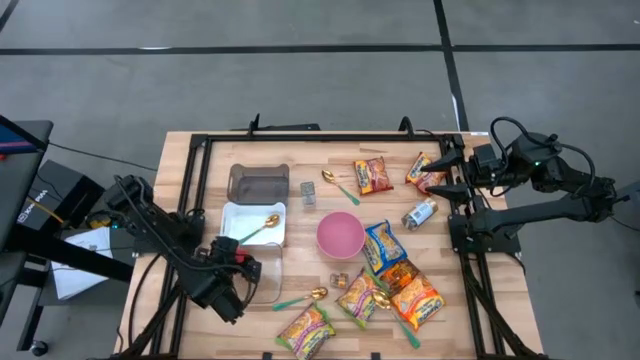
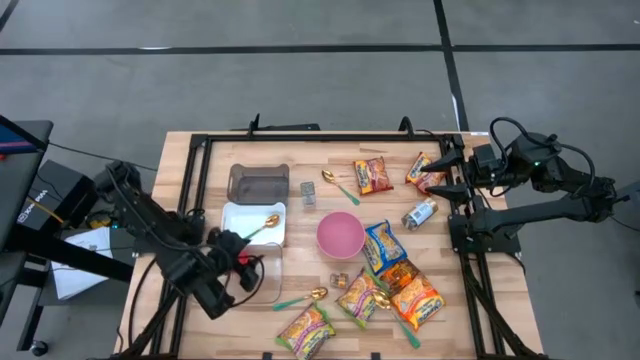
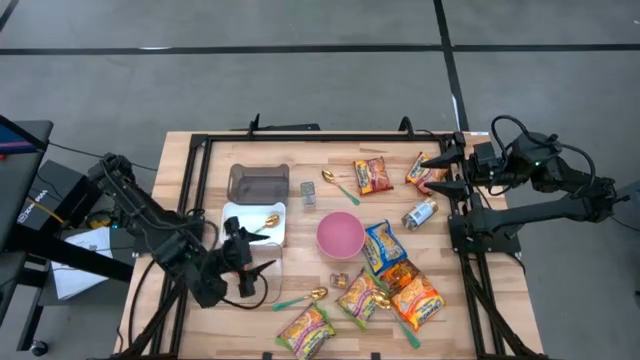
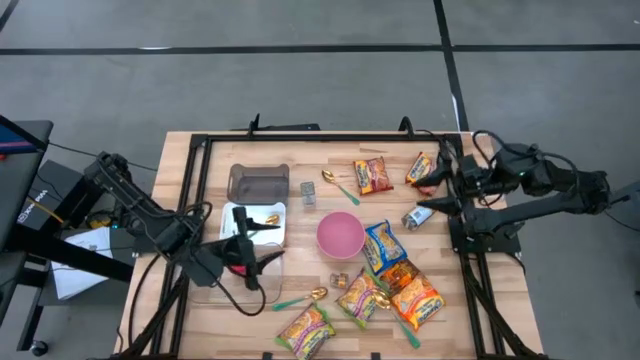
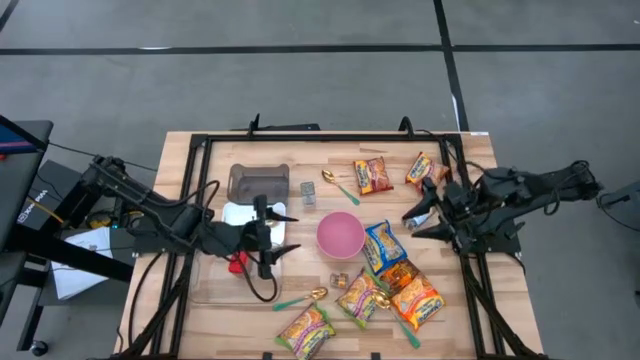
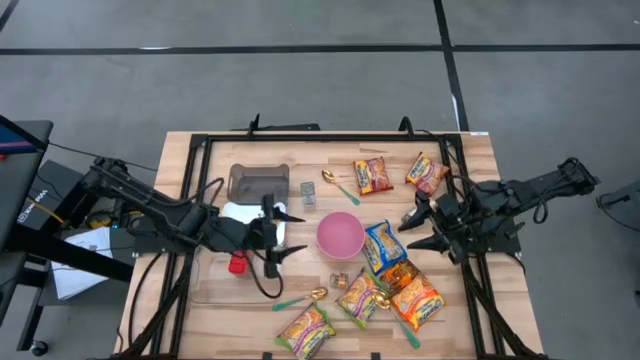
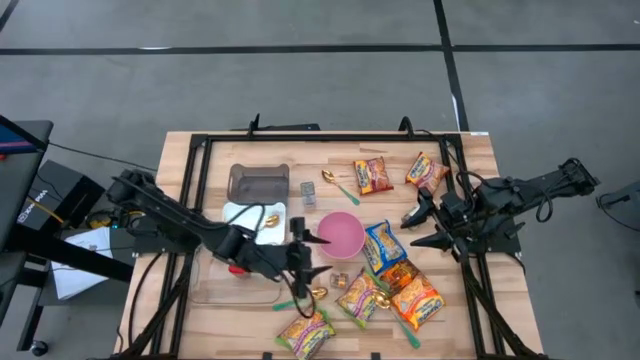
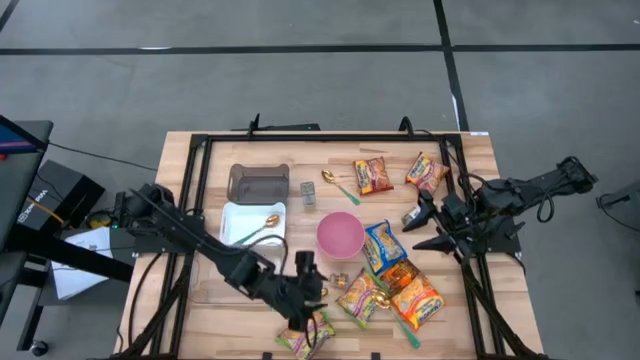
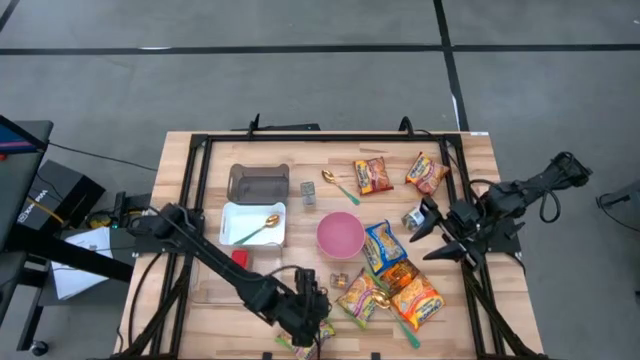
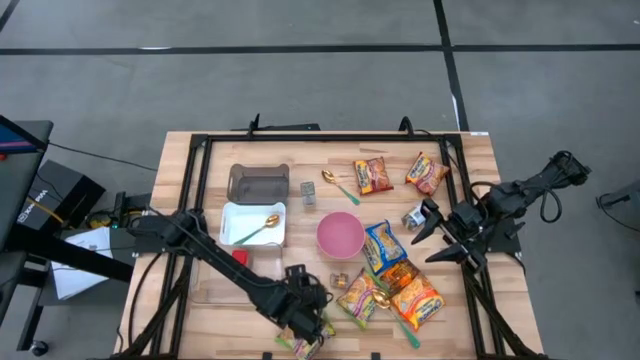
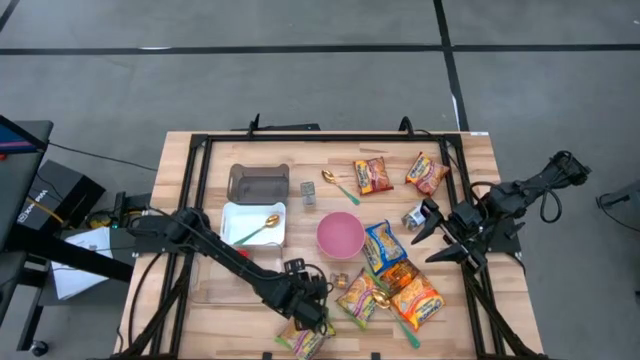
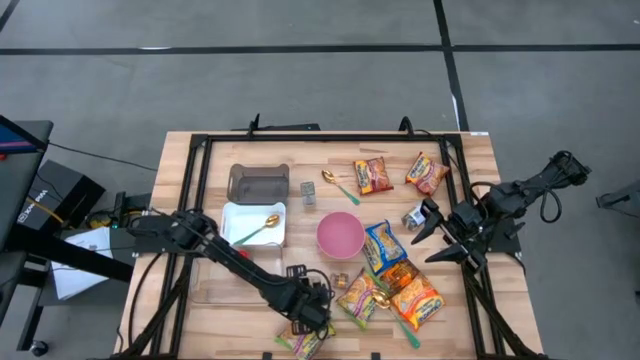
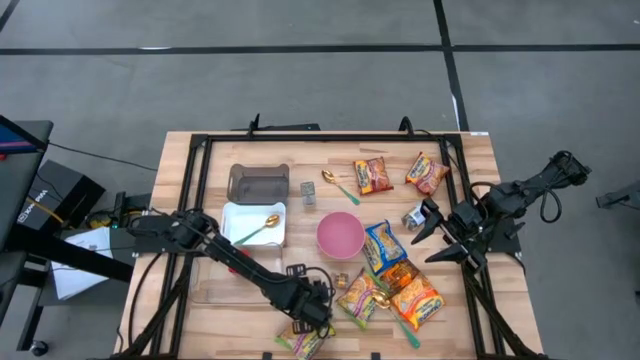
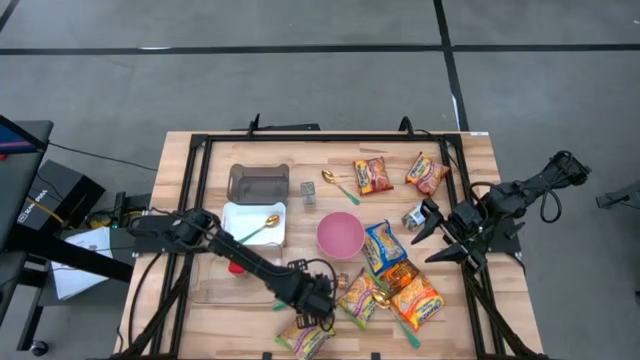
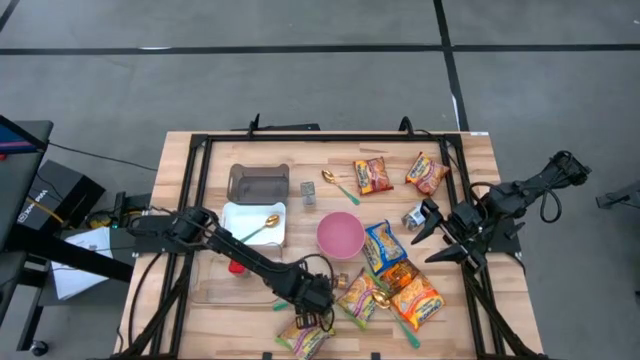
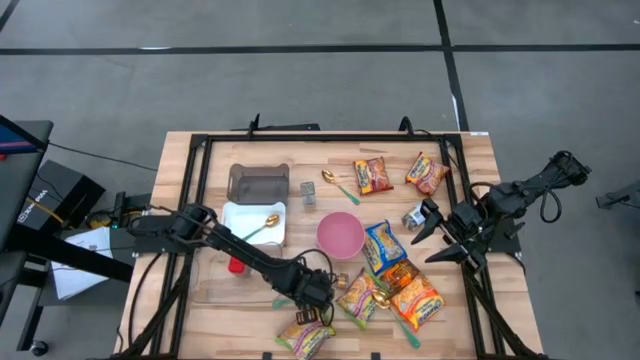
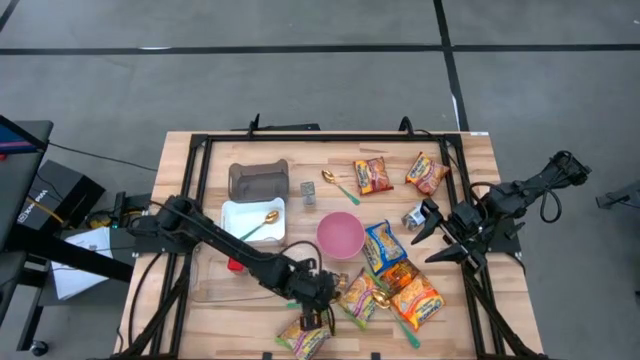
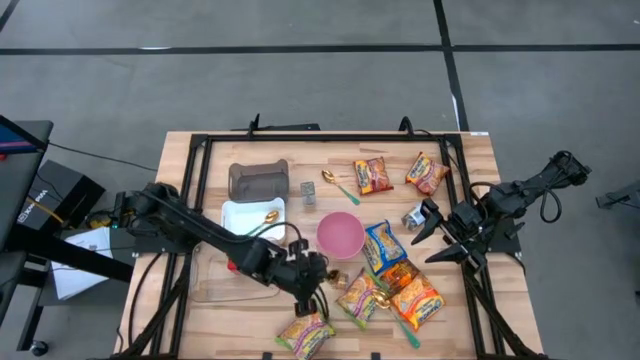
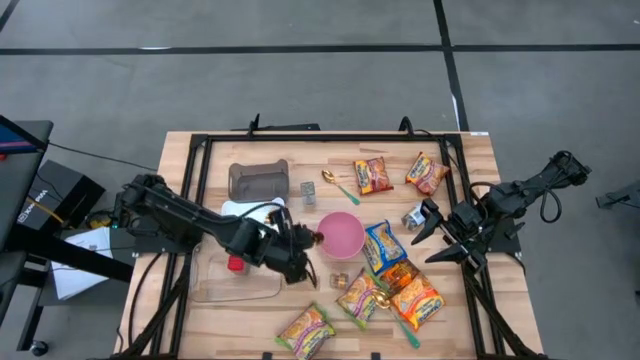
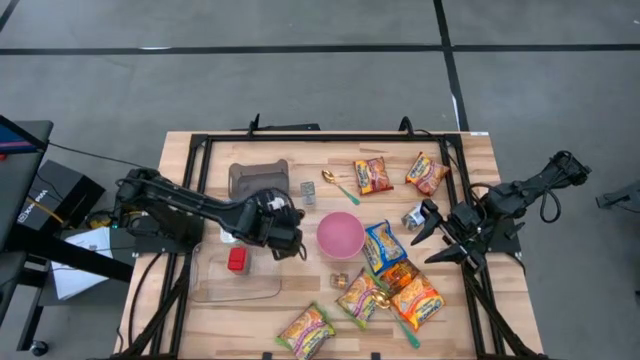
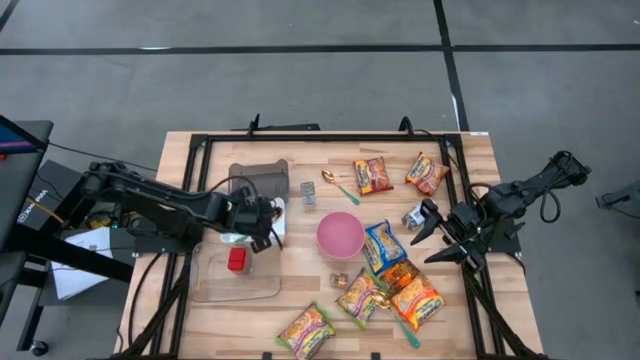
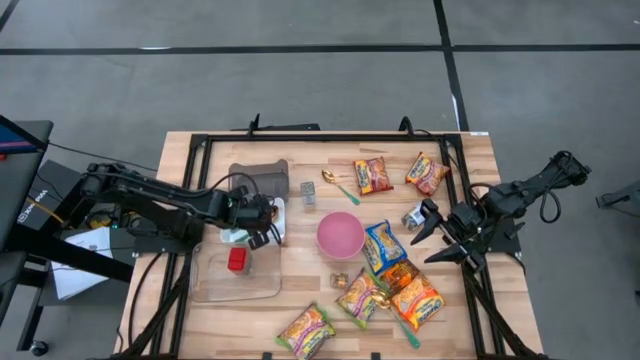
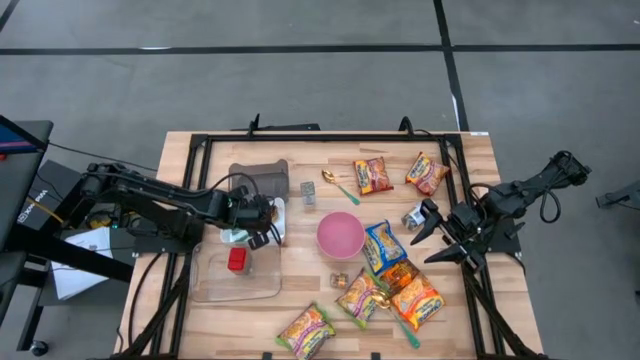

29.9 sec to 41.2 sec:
Task: Pick & Place Food Item
Put the green spoon into the white bin

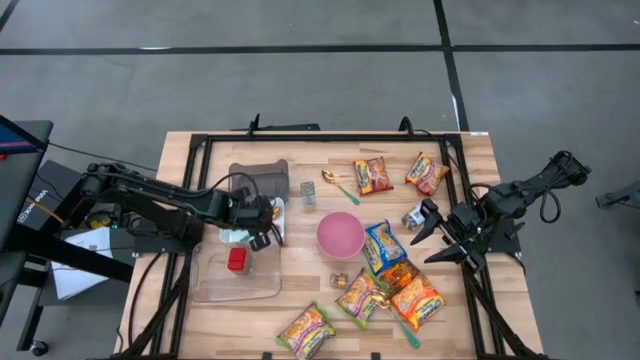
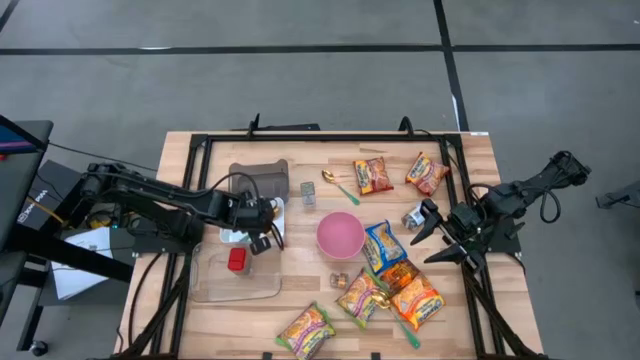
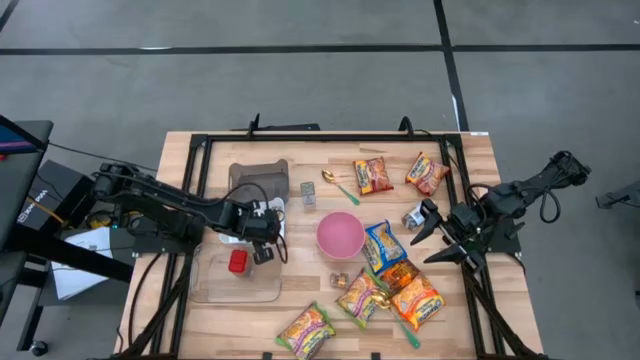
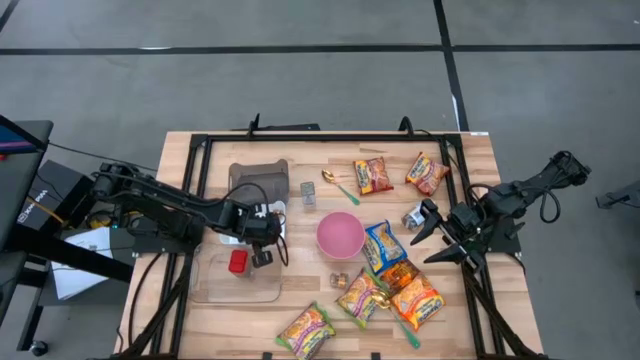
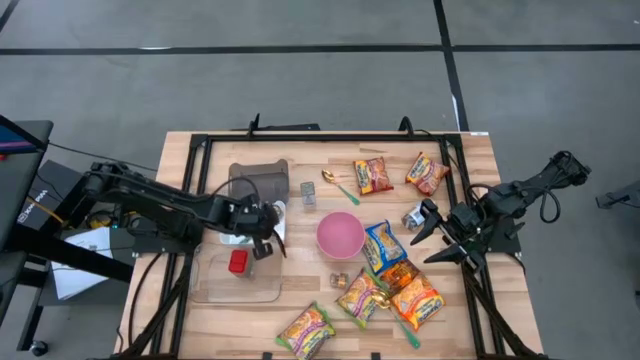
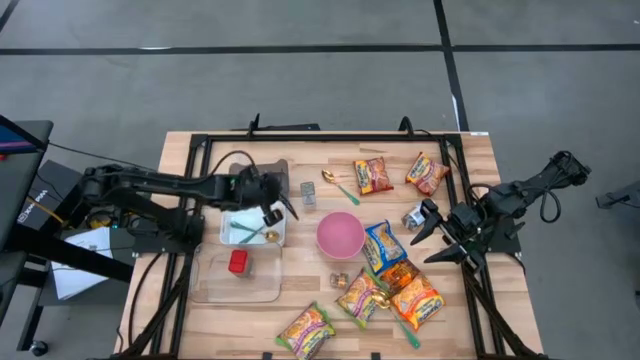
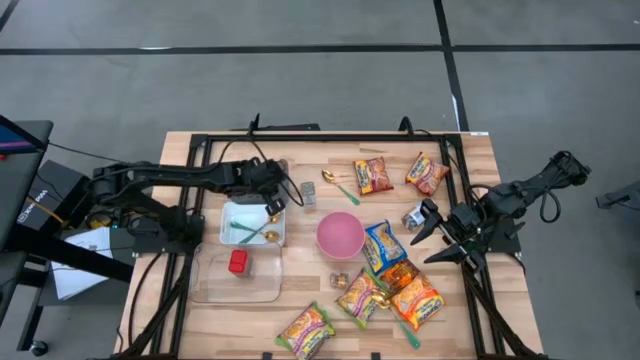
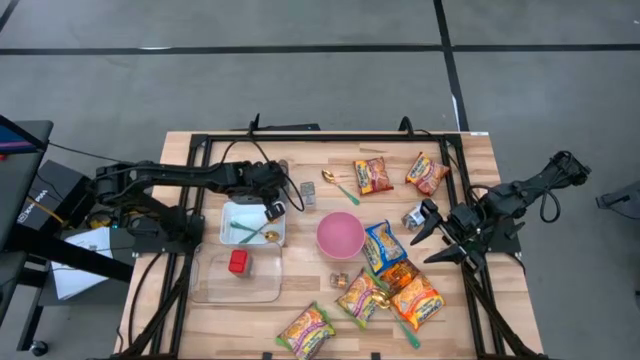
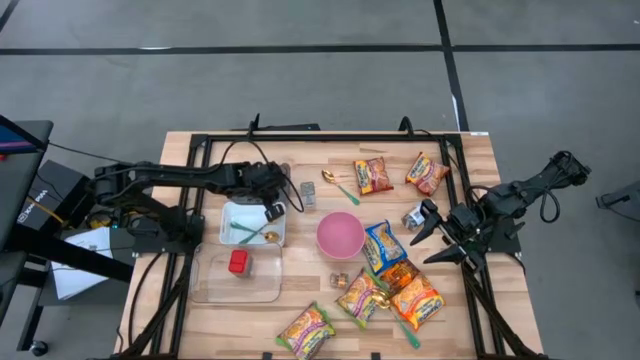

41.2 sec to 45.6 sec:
Adjust the bins

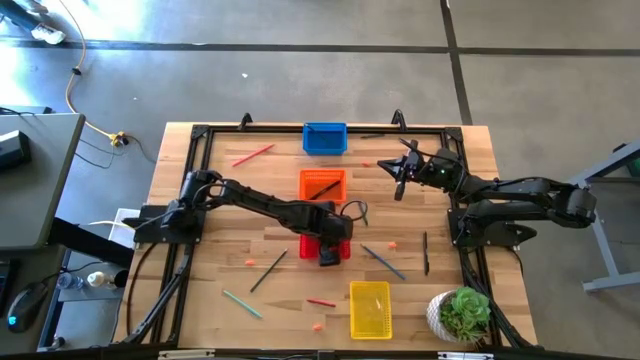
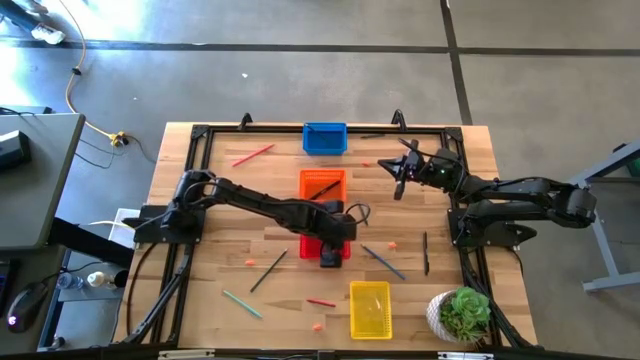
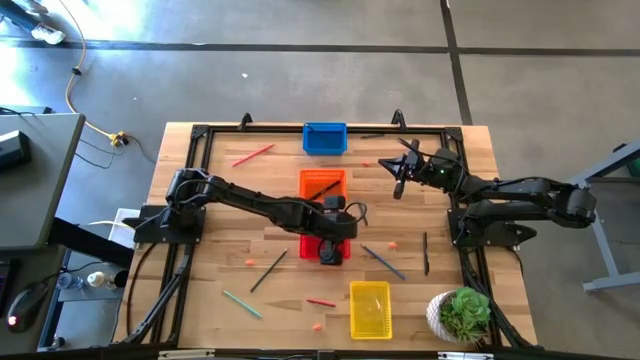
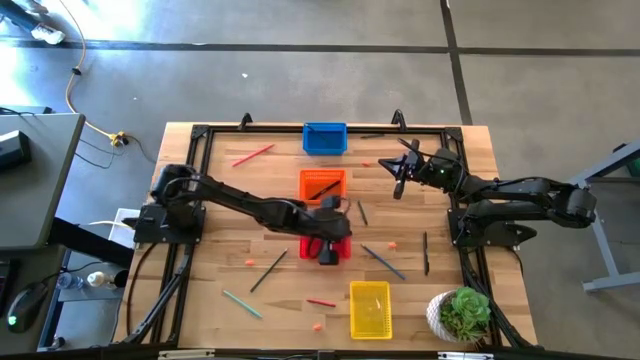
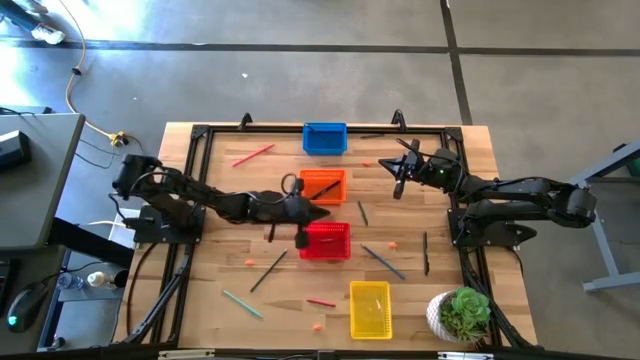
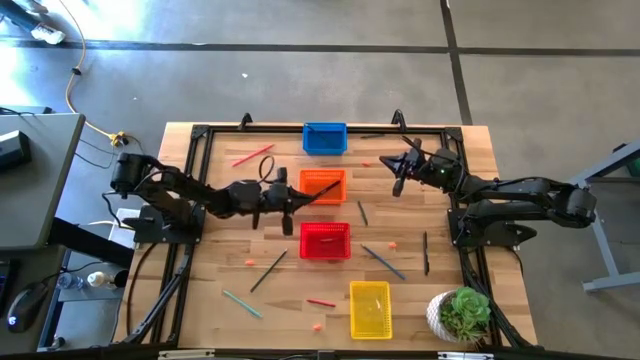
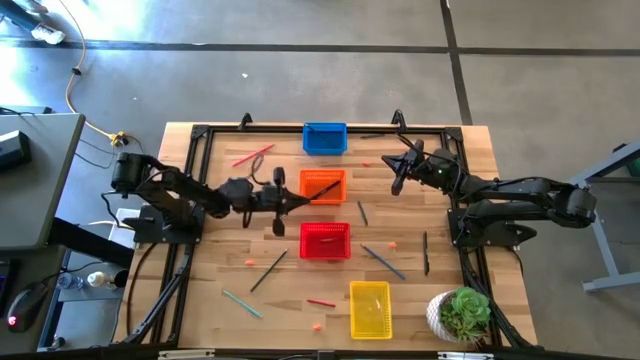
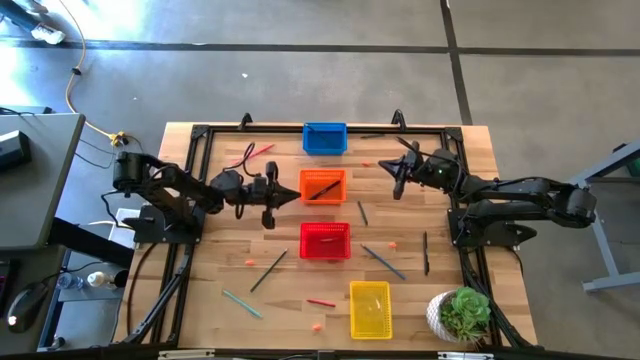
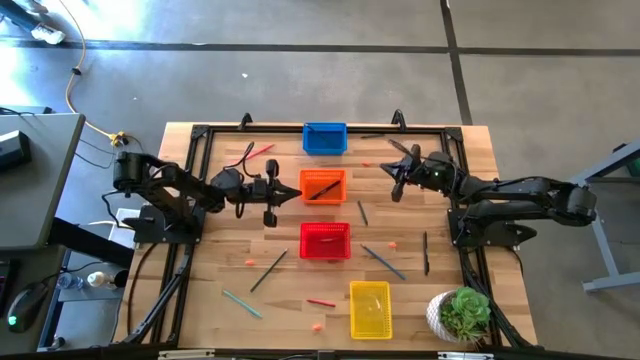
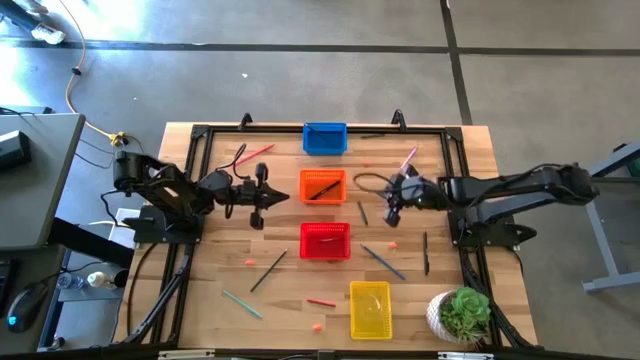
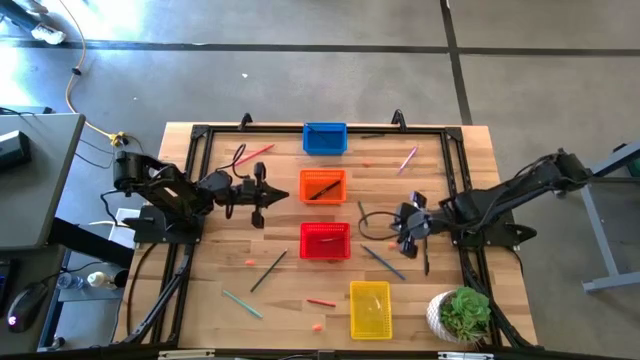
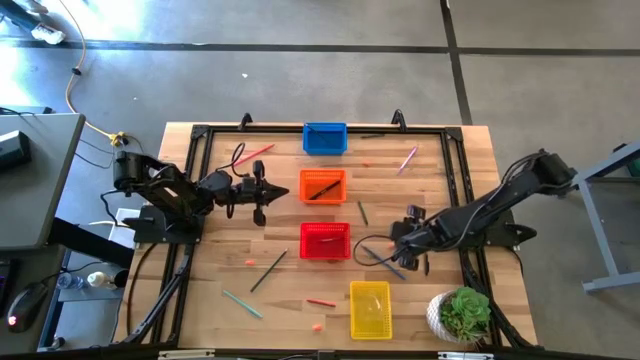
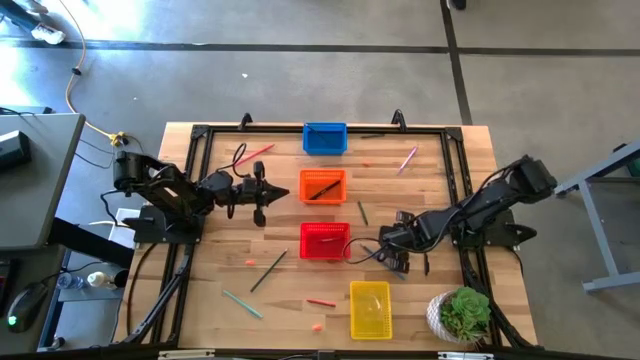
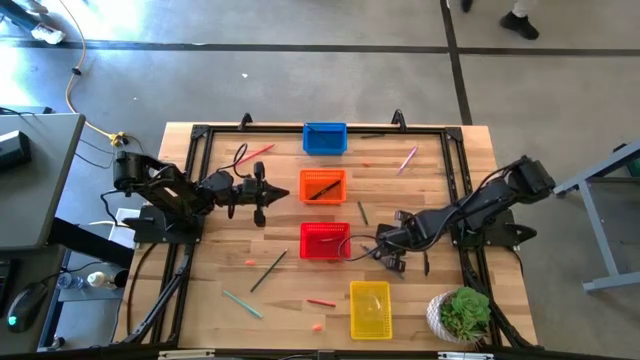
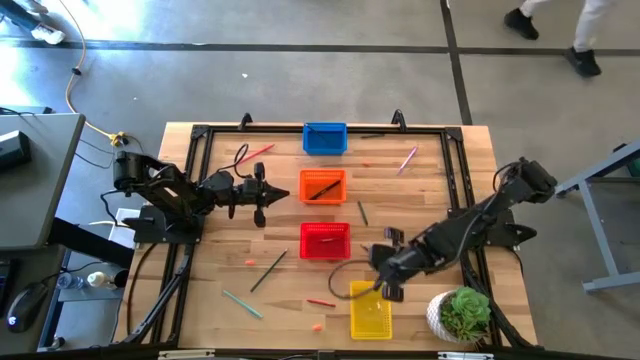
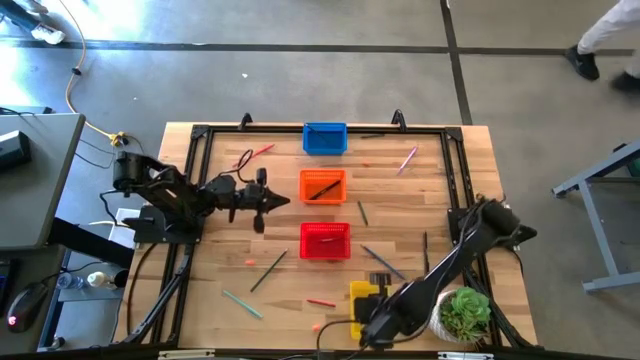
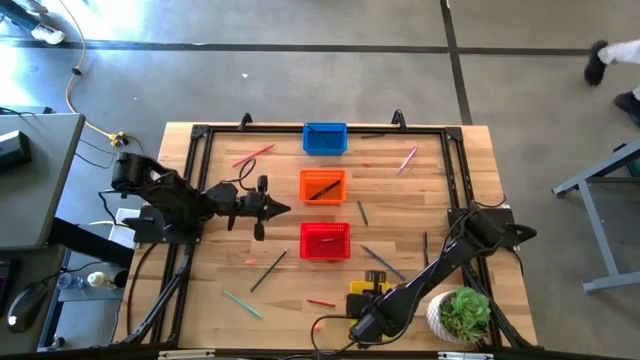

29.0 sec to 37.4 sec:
Task: Sort crayons/erasers/pens/pencils in bins
Put the orange eraser into the yellow bin
